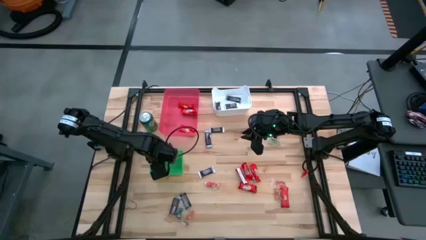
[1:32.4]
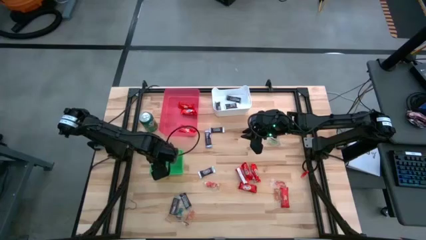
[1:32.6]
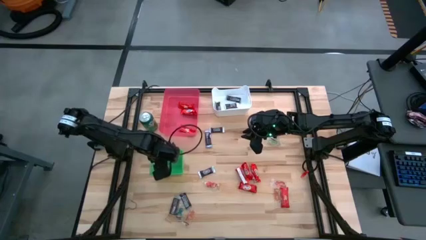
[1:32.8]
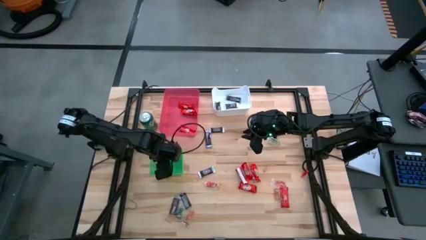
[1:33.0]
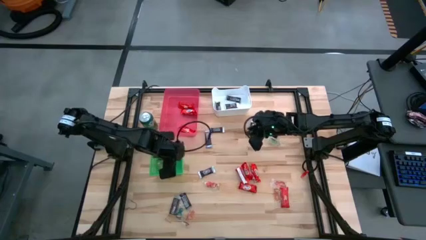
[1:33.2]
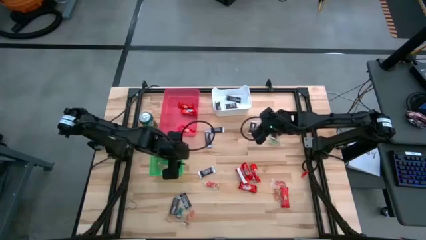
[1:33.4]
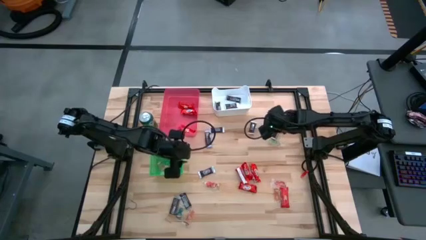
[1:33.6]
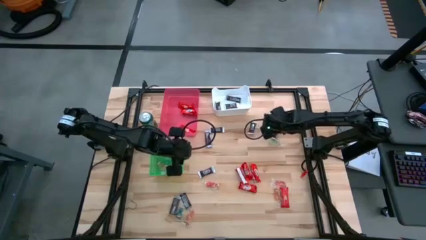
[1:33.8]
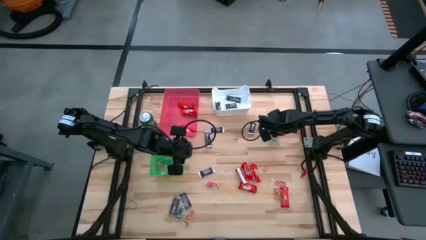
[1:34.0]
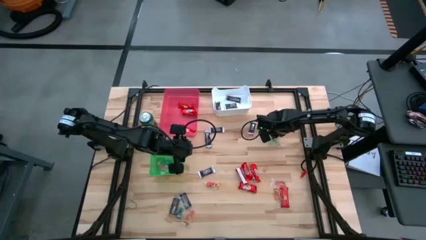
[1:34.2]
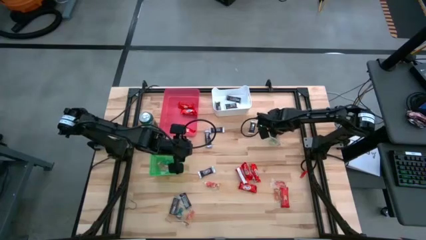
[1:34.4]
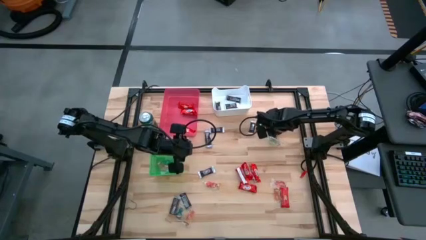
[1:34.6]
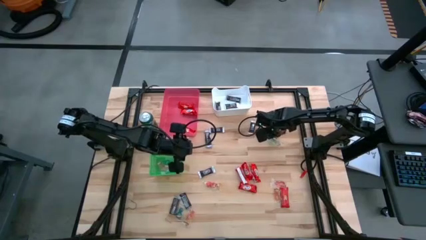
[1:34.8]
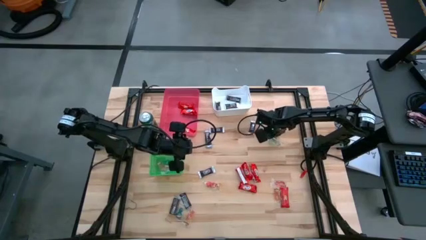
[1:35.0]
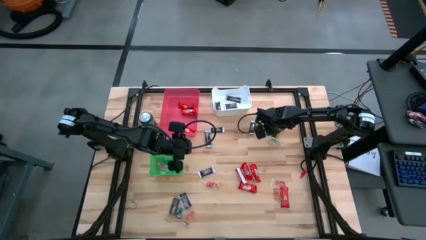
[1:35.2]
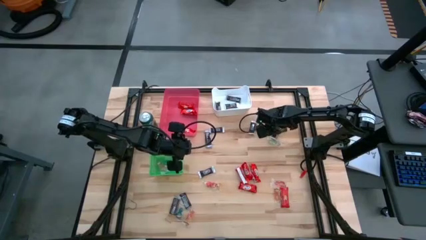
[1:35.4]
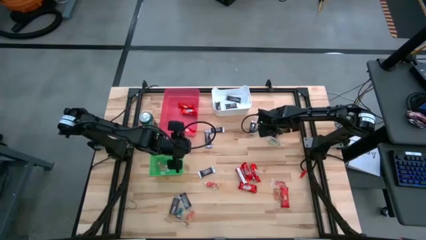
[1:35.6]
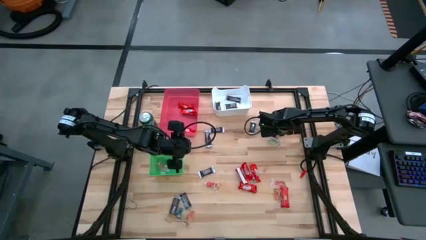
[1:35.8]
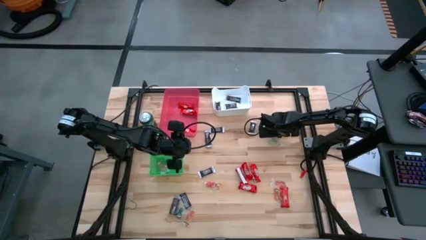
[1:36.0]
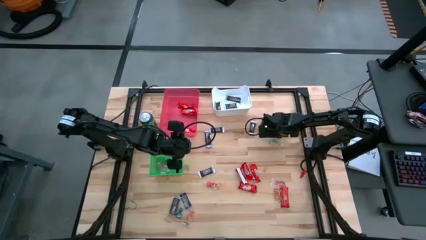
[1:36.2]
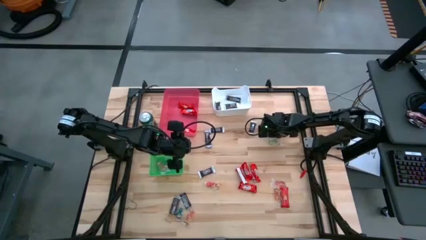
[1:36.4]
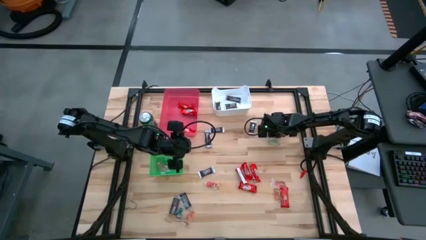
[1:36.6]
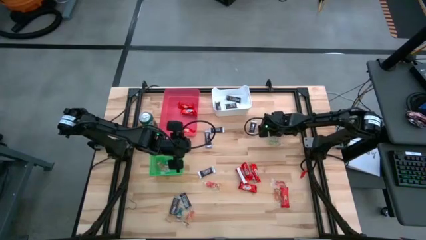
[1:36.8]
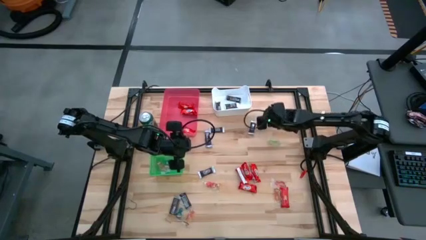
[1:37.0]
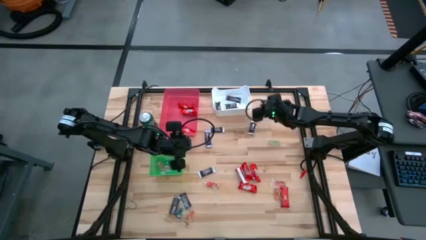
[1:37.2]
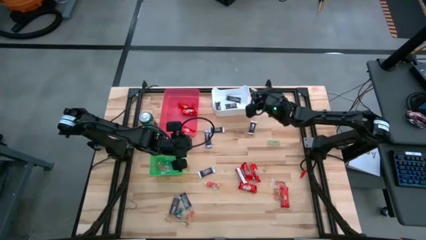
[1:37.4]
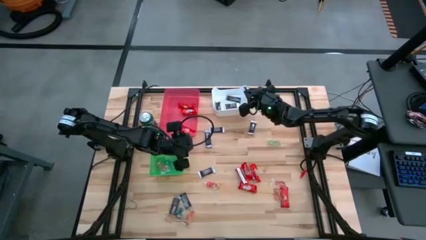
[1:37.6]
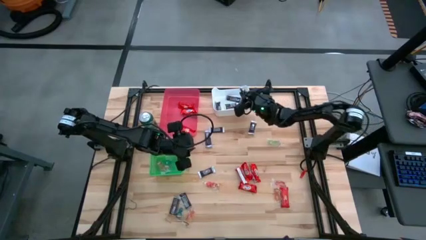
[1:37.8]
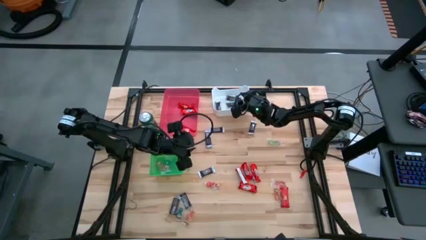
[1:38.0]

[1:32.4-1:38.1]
Task: Organize candy in baskets
Put the brown chocolate into the white bin

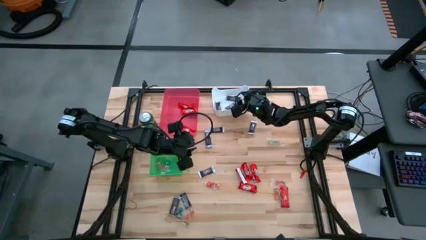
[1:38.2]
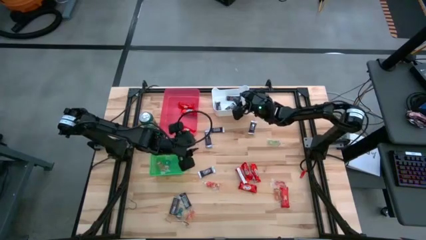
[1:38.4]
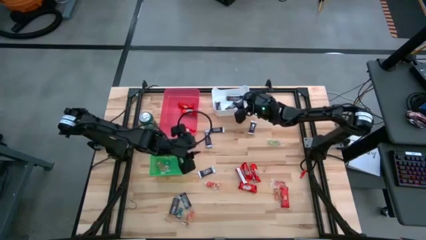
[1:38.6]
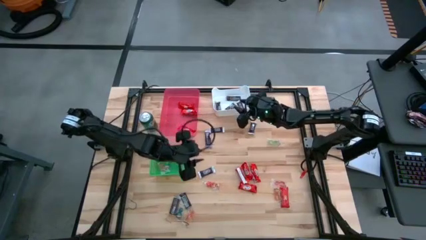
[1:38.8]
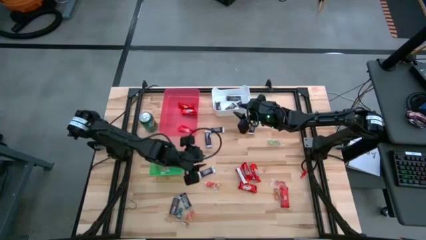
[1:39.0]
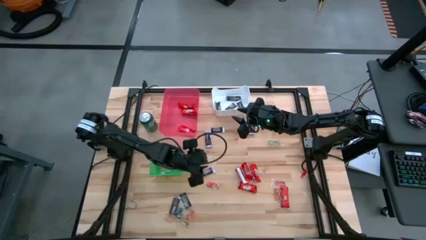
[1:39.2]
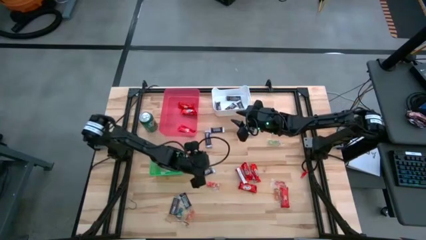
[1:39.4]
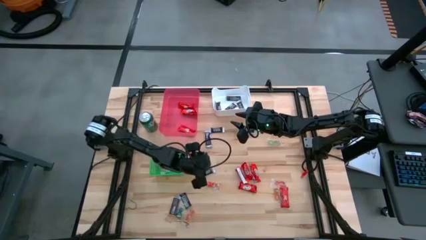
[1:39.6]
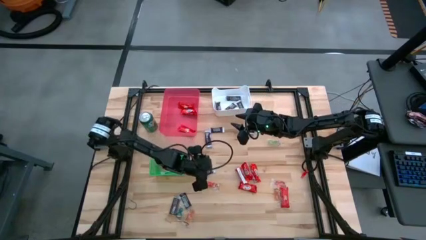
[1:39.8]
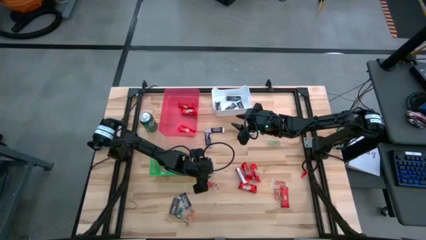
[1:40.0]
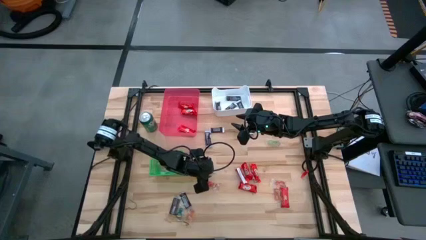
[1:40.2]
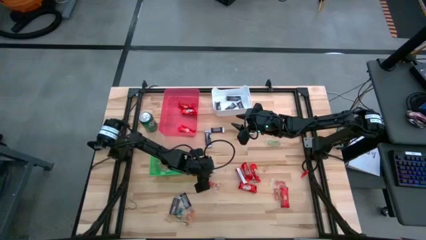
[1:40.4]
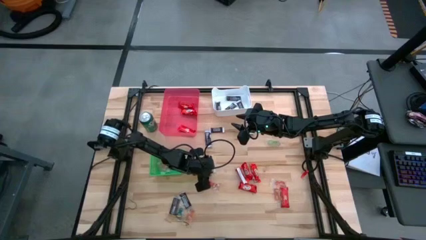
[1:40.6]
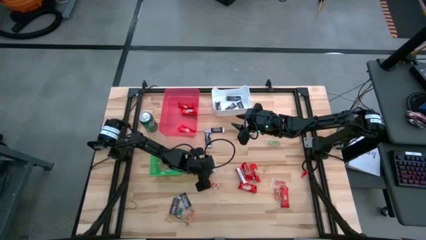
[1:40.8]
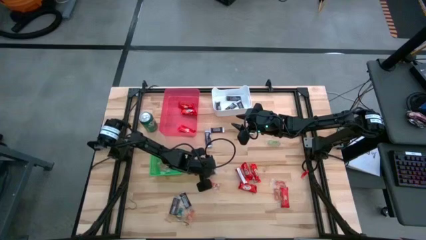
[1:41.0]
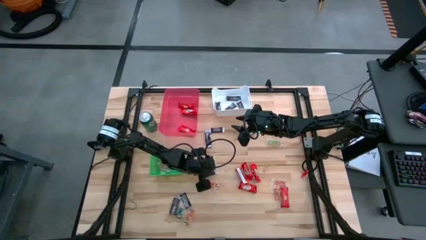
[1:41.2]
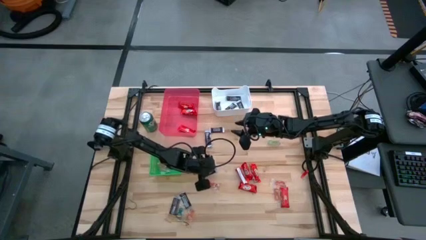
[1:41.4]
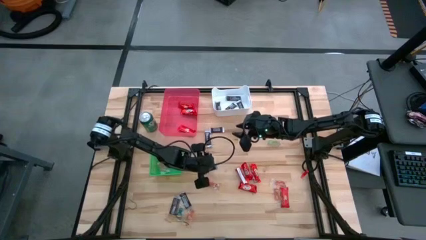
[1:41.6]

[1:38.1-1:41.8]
Put the brown chocolate into the white bin

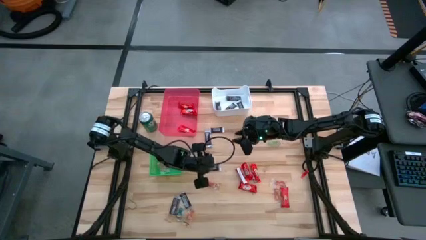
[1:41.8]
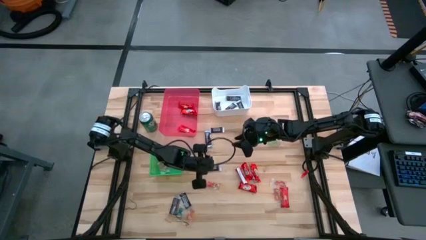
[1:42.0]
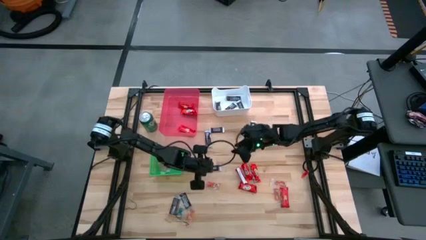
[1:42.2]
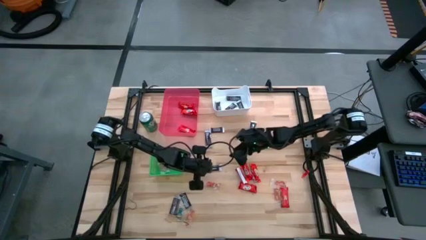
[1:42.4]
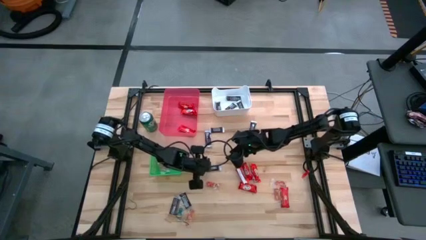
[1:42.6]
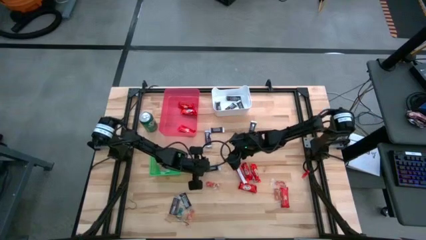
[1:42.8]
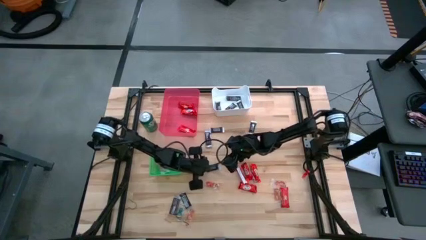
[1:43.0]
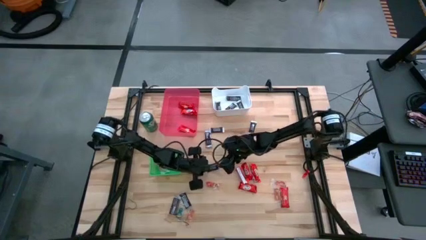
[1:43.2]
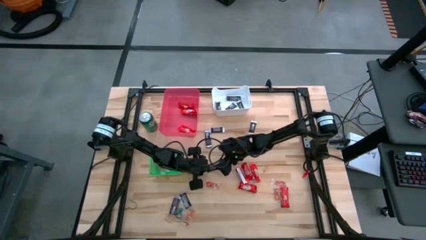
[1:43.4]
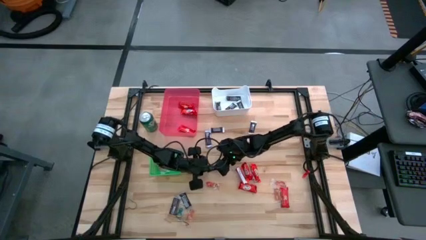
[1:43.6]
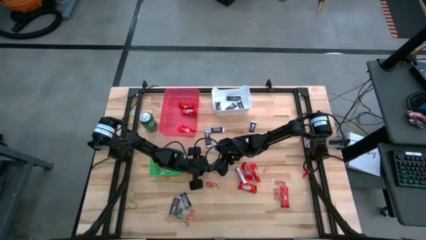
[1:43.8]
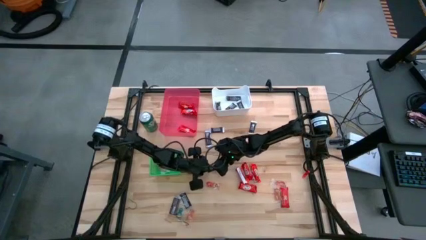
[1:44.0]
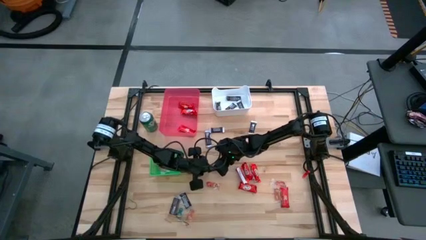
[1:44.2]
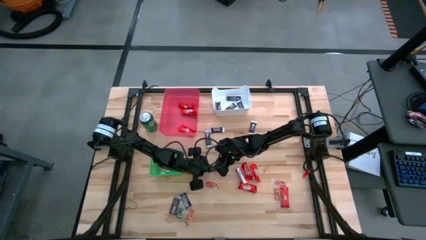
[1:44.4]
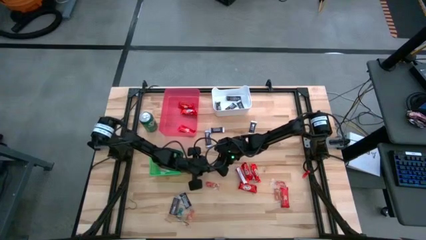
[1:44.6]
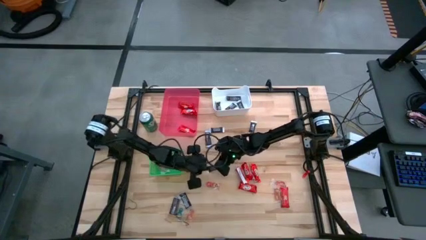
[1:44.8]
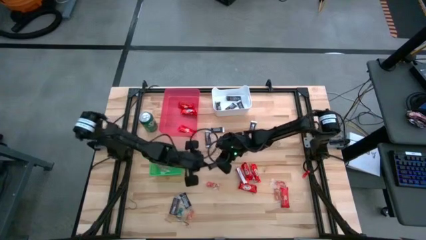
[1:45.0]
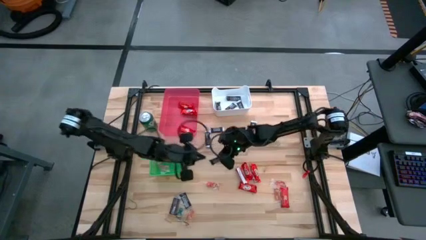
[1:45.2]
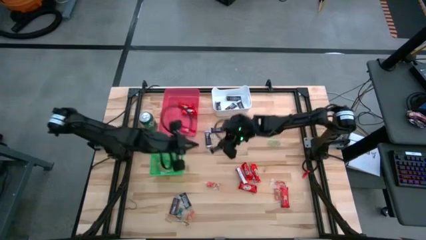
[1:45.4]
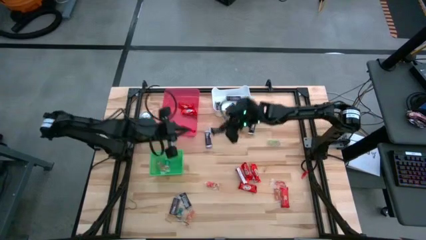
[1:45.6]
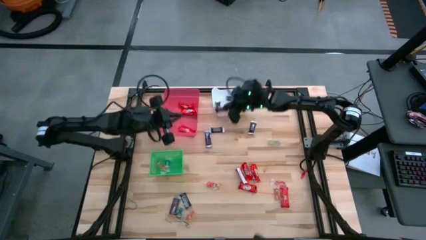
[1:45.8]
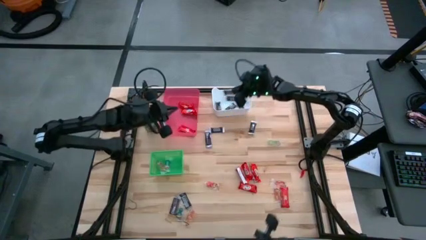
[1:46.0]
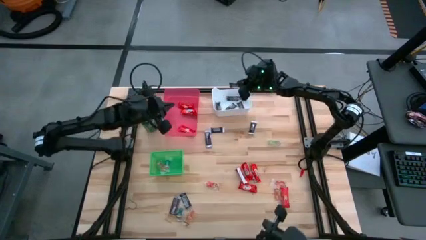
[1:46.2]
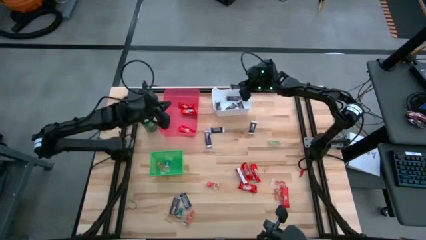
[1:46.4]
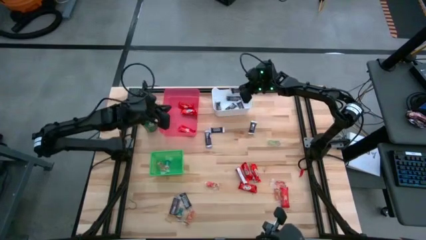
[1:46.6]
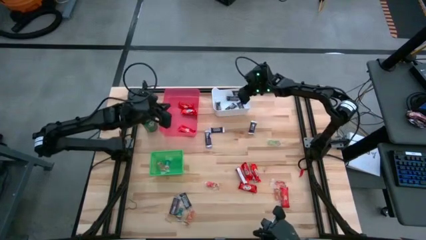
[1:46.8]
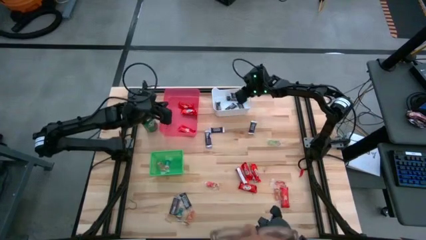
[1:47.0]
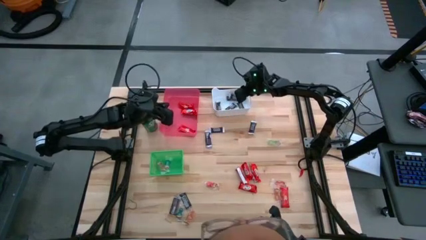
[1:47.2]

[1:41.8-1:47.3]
Put the brown chocolate into the white bin
